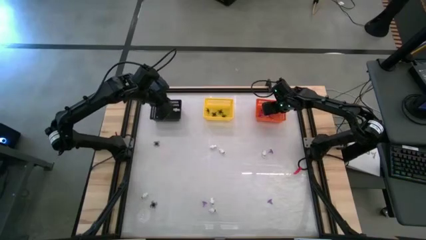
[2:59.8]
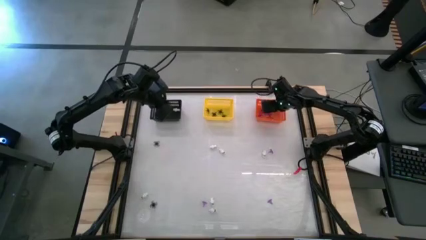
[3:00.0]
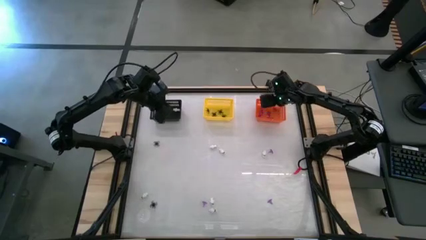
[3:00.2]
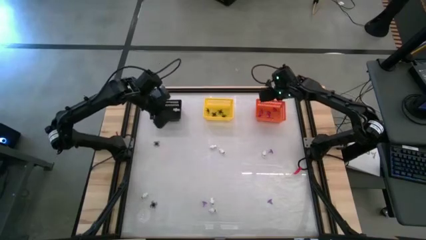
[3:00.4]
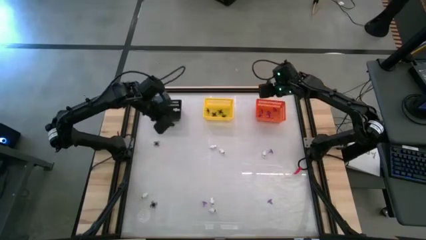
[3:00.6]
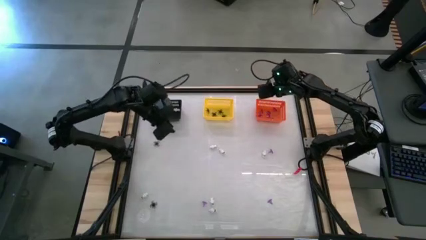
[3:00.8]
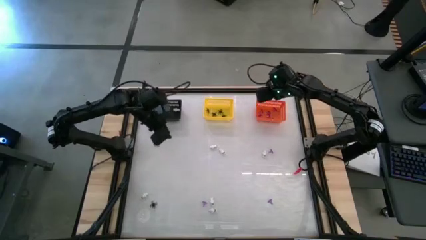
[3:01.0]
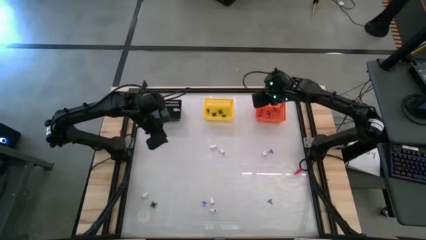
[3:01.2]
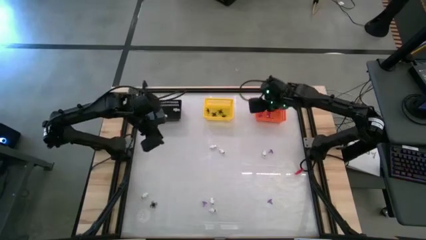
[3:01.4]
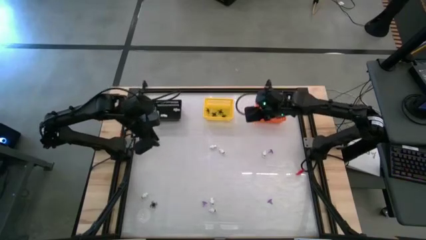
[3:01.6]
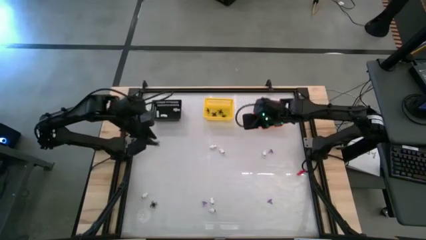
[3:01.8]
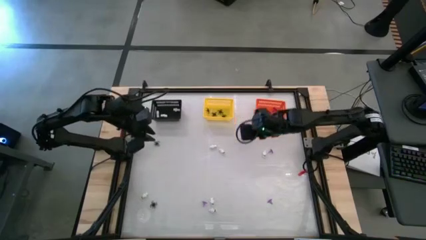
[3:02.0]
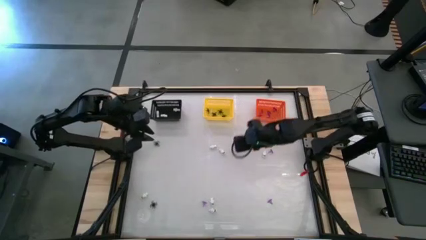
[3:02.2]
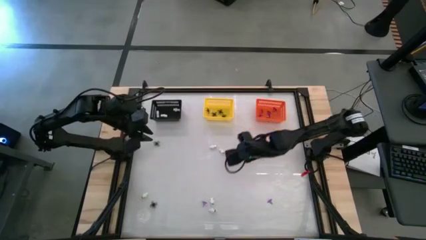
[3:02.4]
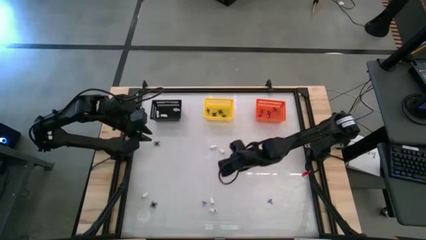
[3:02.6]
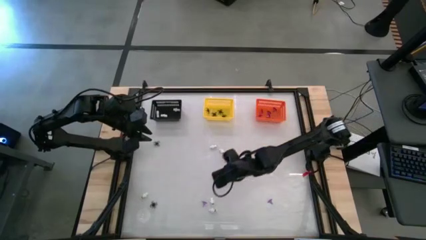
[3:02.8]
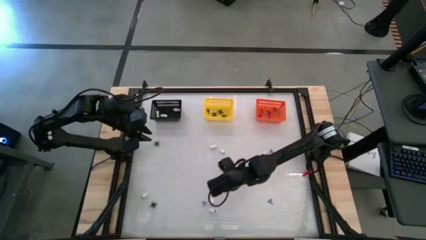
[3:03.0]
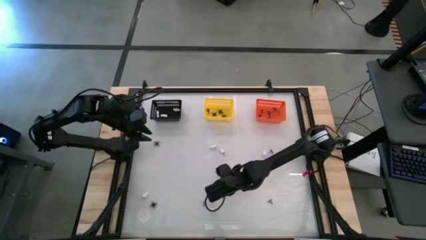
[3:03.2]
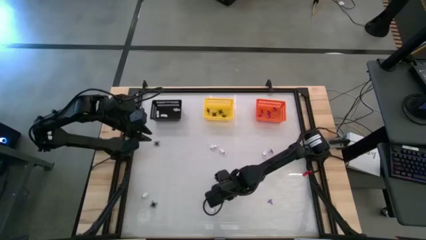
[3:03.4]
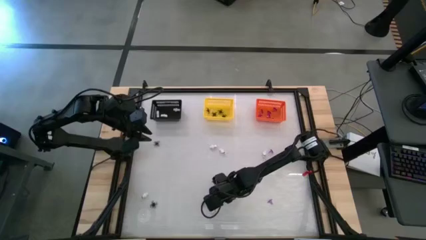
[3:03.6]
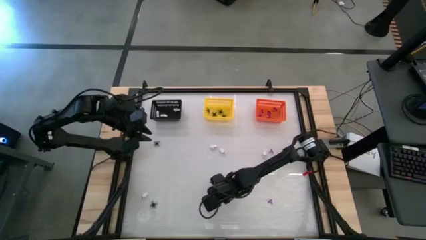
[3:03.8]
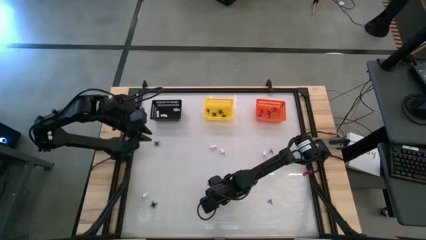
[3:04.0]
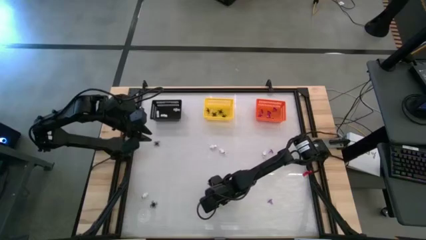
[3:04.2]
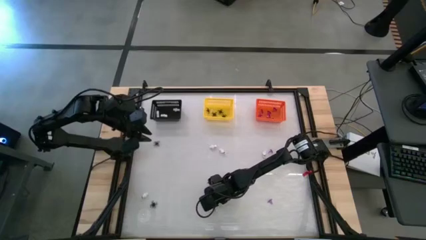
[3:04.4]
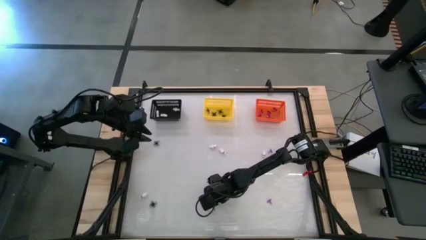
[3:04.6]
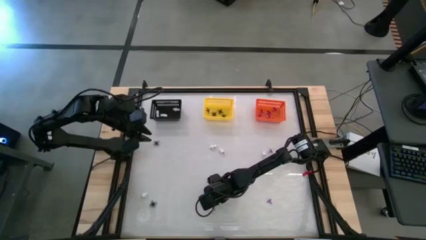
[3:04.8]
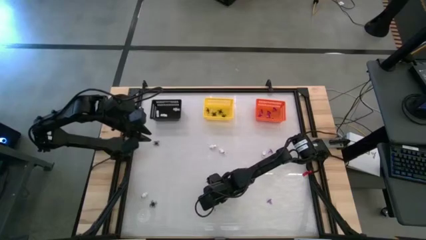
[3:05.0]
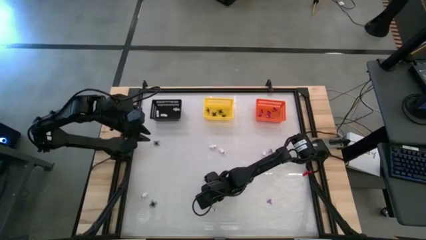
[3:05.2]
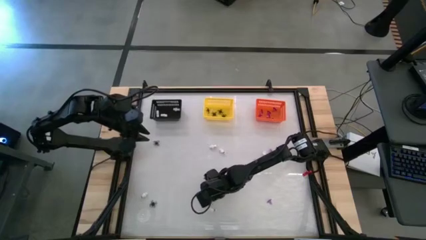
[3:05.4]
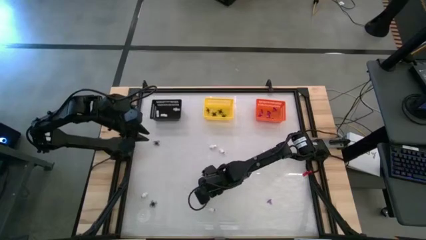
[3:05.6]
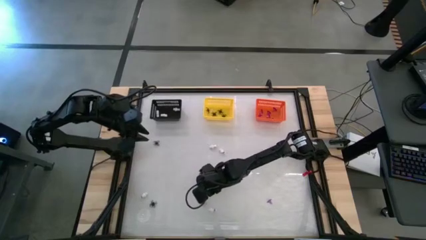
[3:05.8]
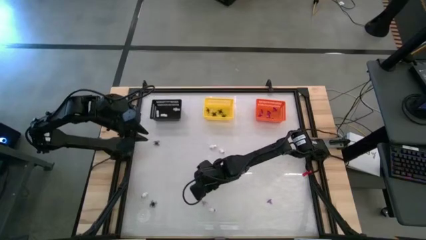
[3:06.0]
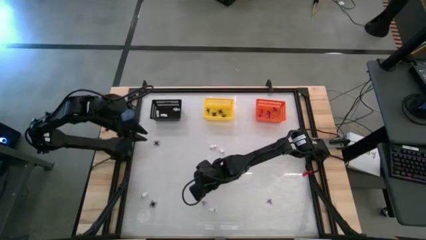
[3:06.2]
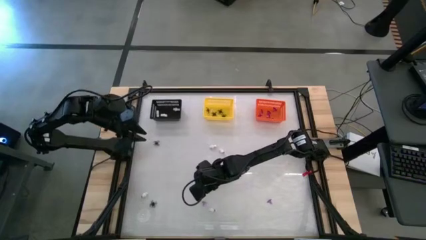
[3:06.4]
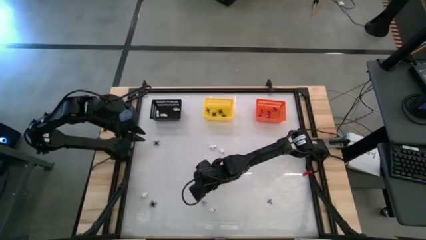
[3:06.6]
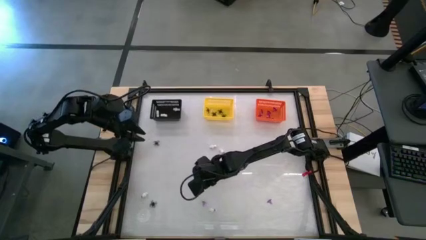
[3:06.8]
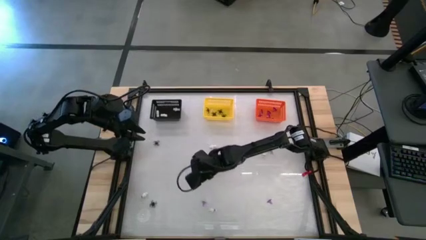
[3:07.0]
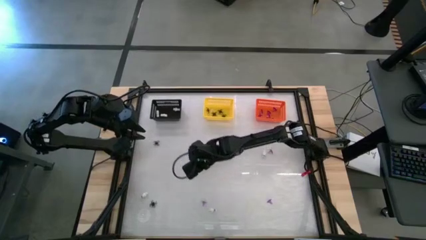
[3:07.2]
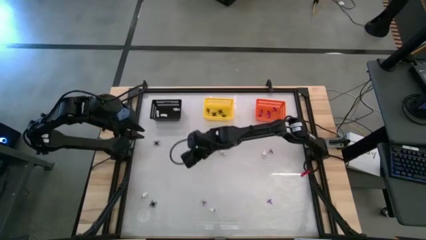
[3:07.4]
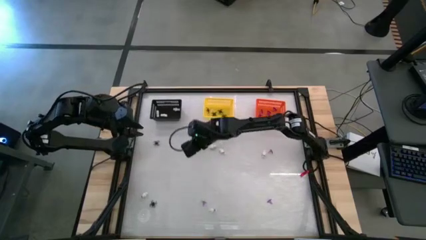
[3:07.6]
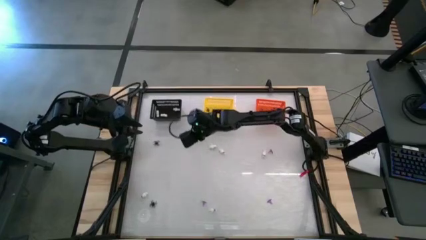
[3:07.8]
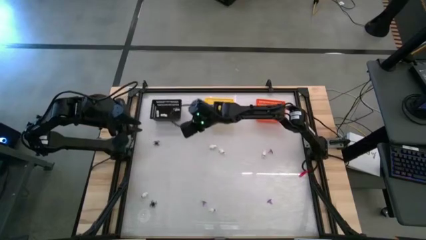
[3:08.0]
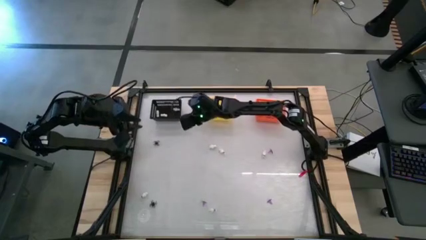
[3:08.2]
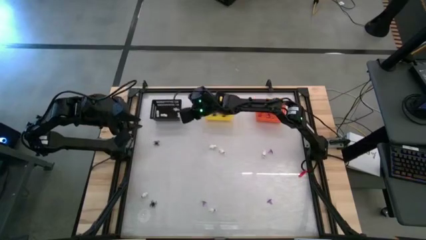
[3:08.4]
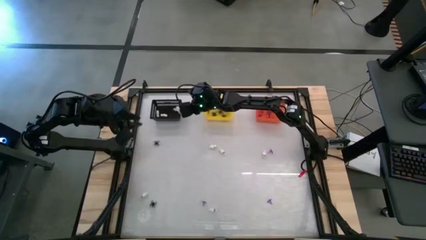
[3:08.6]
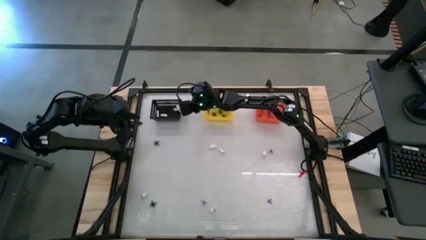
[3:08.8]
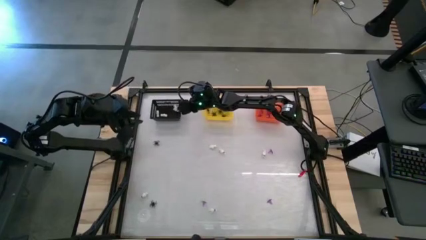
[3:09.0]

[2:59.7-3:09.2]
Task: Sort Halloween decoration
Put the white skeleton toy into the black basket
